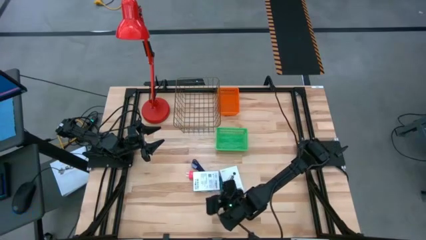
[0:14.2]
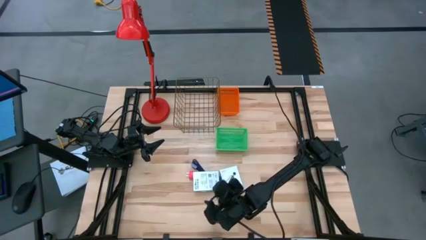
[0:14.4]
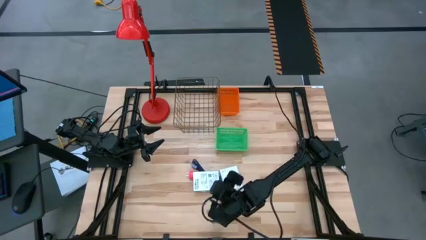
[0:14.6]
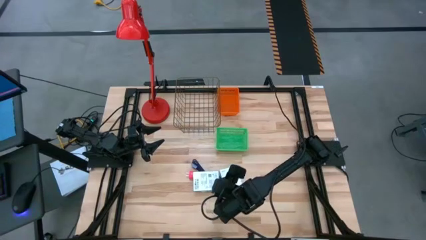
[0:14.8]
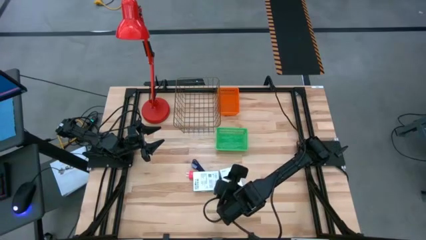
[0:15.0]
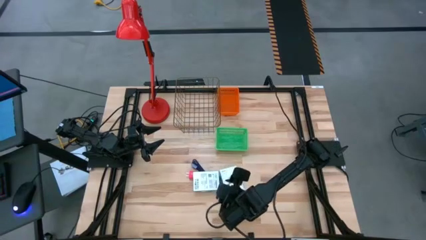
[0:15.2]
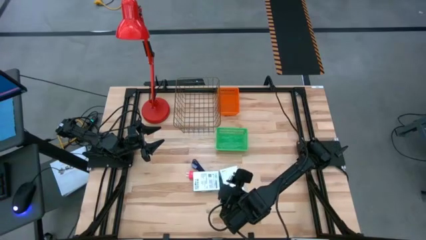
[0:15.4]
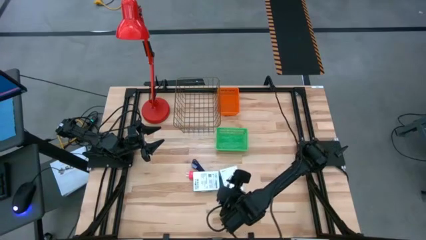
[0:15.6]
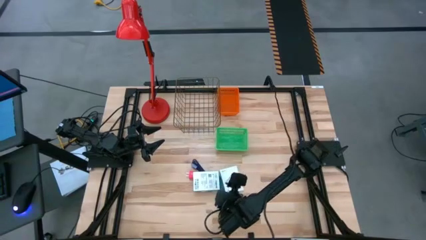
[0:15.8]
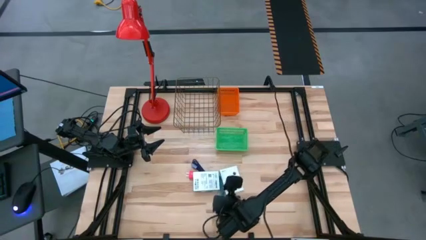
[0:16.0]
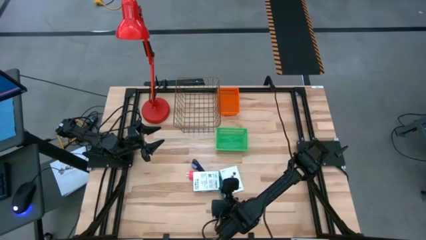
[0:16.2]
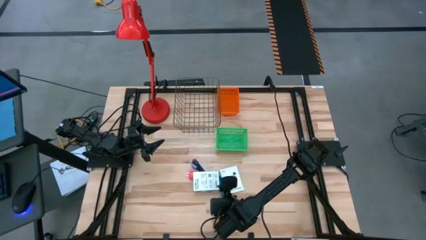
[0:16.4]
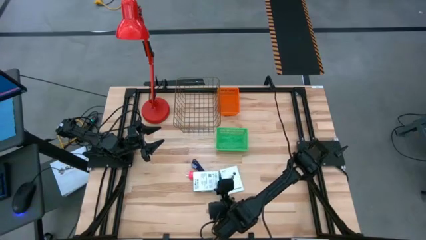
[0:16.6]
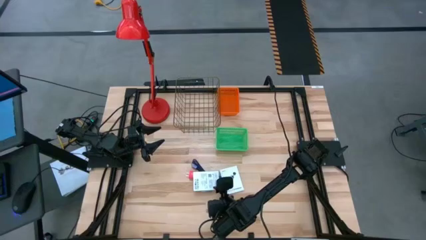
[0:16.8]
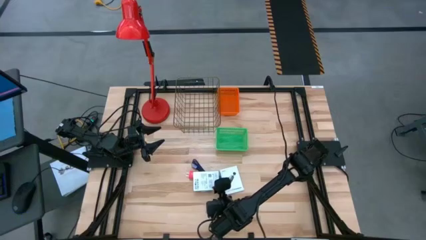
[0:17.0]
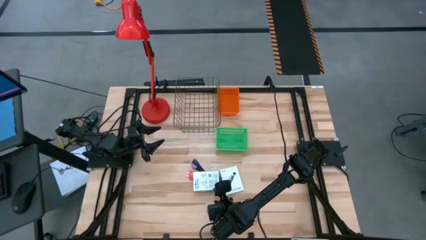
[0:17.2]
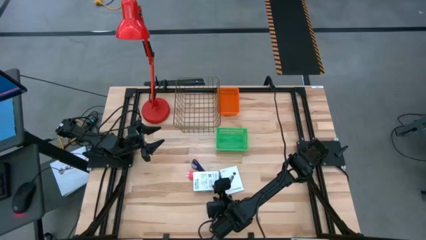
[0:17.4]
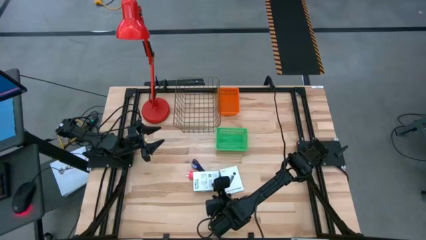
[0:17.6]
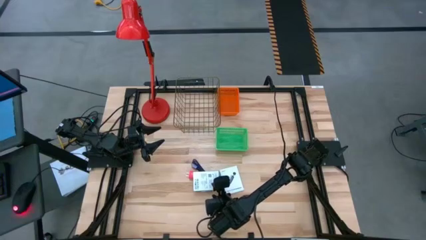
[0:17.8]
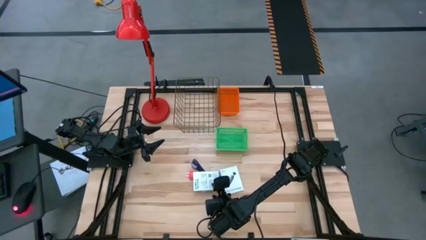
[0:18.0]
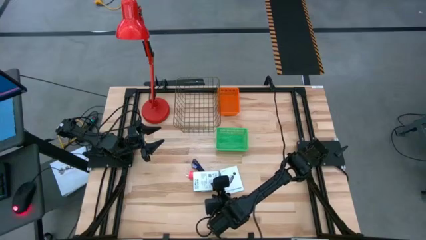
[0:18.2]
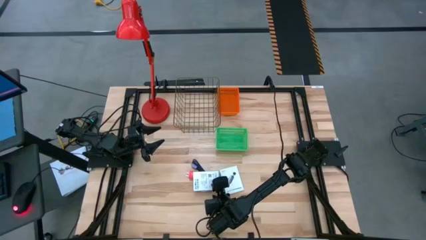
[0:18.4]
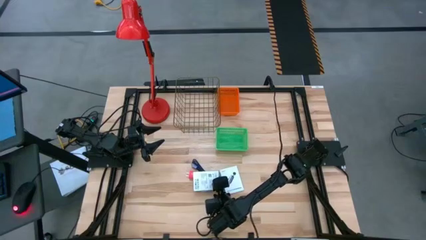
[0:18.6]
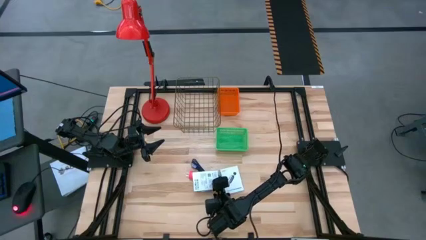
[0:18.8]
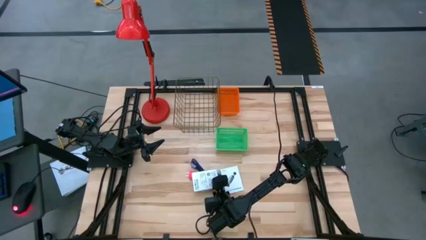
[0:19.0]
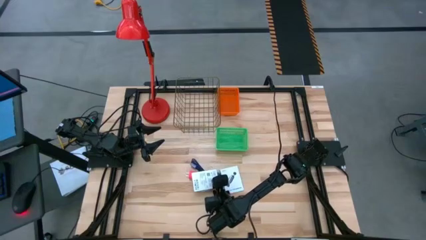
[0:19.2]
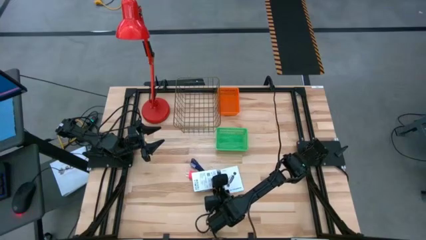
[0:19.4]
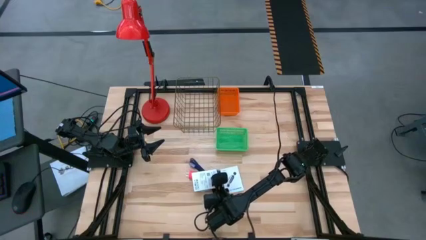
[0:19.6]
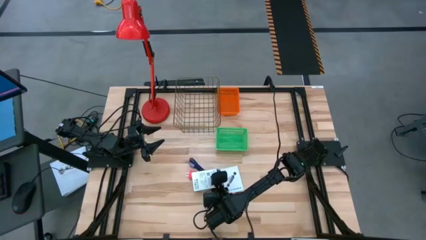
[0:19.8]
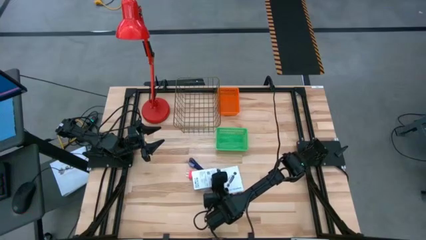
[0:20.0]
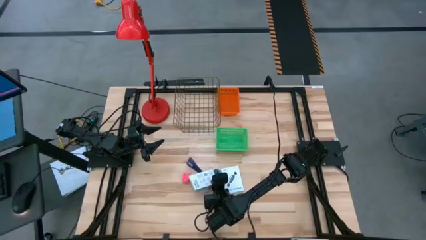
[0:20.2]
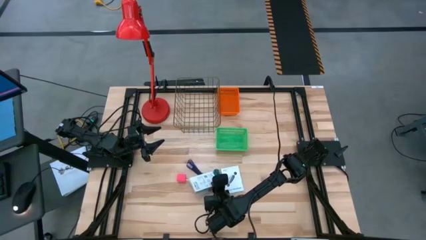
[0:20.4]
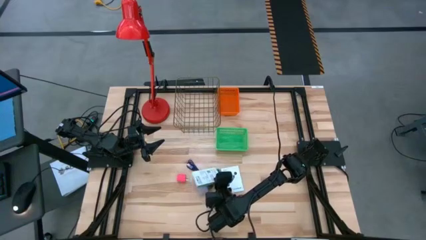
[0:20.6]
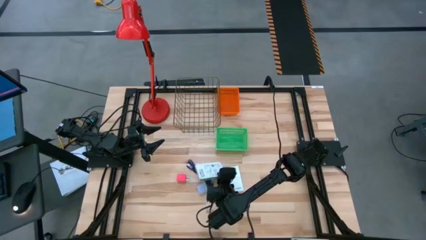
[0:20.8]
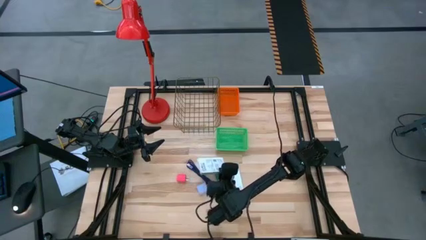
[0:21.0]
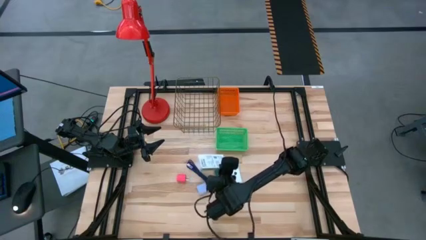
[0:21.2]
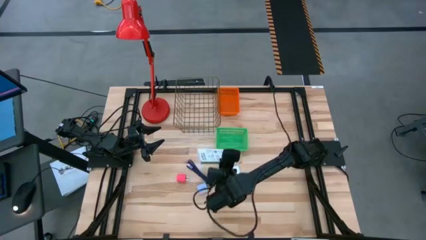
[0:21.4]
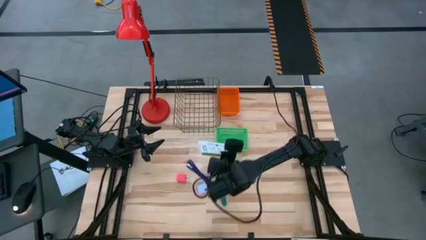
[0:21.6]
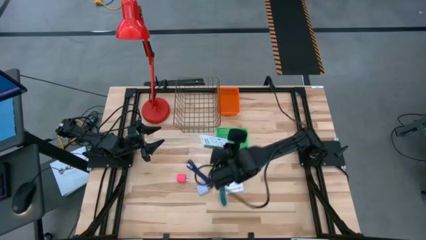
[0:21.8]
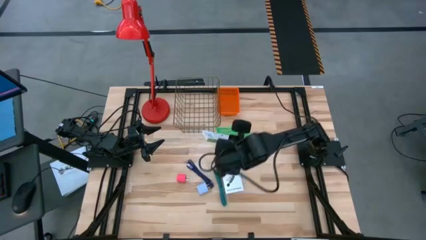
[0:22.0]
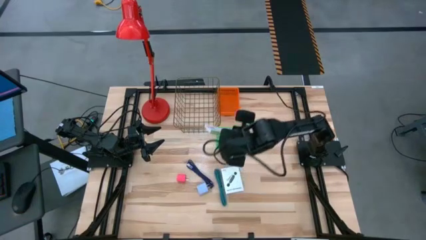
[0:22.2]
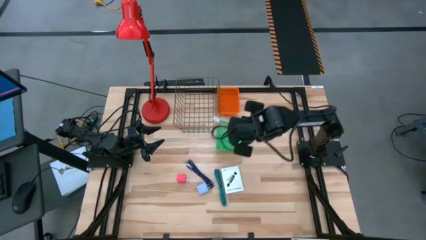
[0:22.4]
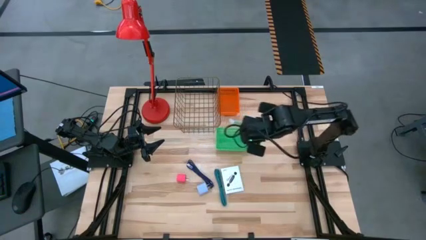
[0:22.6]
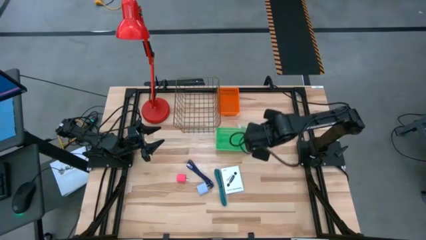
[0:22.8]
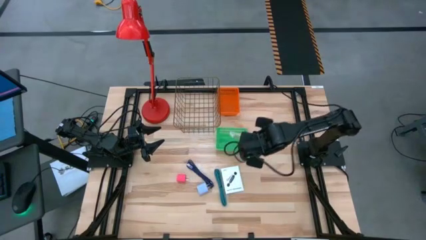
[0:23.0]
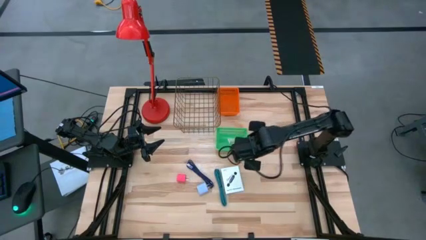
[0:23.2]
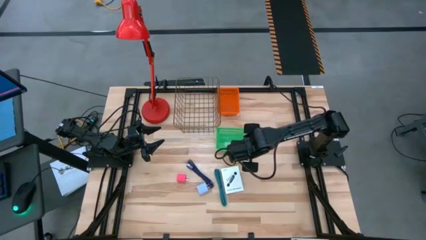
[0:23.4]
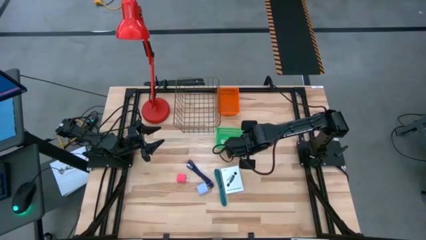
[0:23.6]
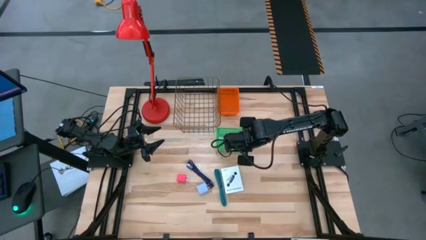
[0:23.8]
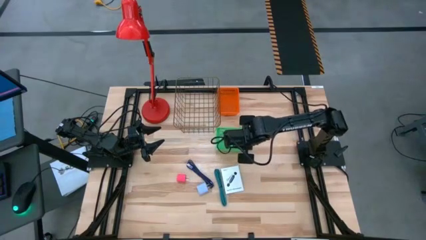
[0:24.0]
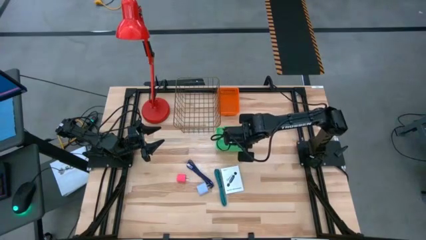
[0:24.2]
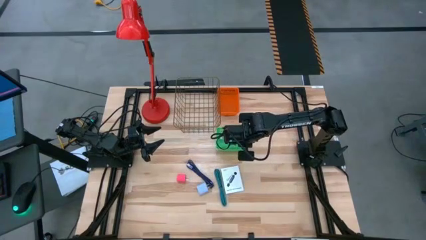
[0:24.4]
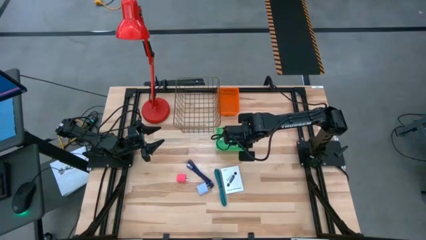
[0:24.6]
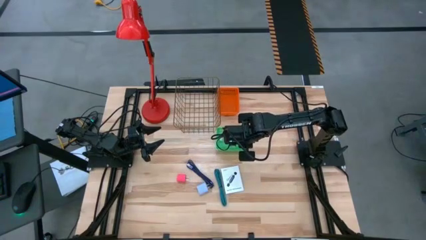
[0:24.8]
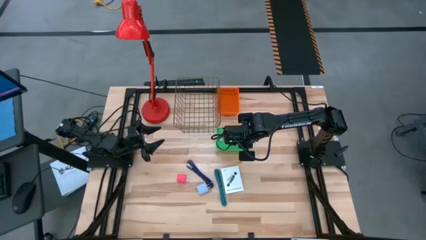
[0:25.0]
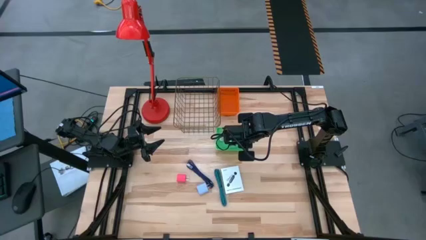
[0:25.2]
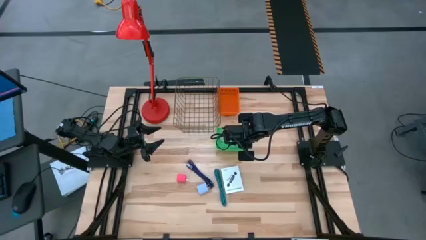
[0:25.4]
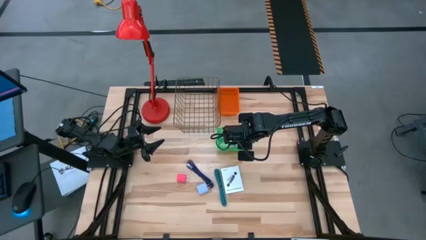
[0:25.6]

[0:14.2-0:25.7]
Task: Pick and place items into bin
Put the left card reader box into the green bin

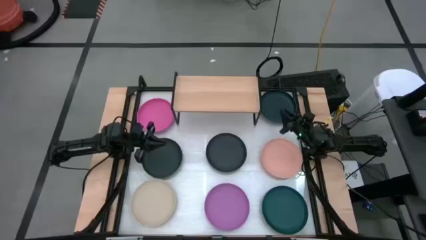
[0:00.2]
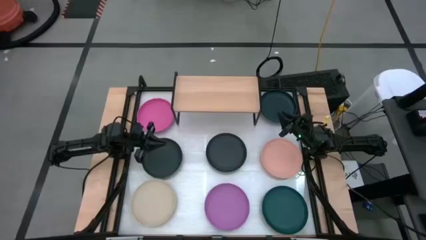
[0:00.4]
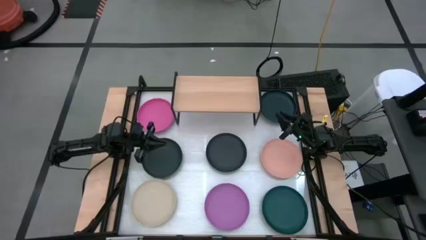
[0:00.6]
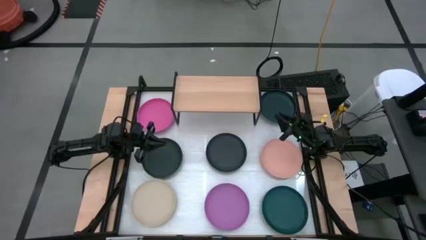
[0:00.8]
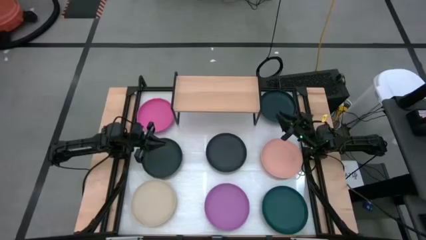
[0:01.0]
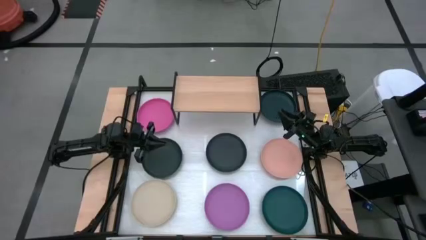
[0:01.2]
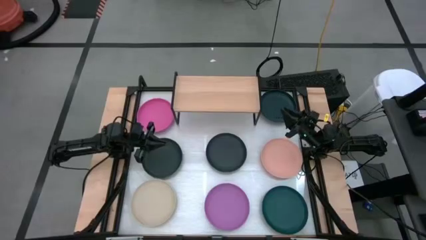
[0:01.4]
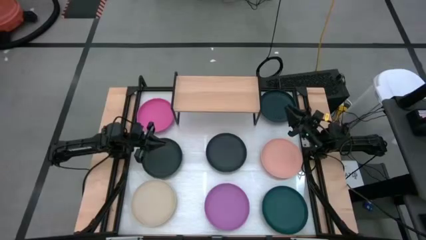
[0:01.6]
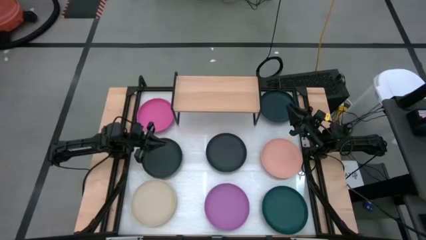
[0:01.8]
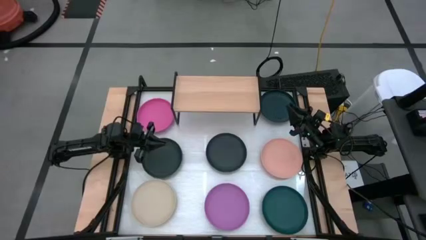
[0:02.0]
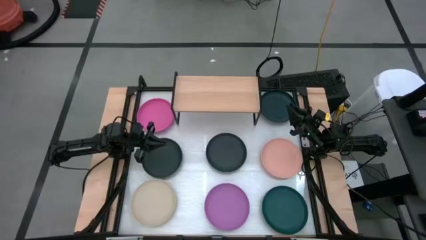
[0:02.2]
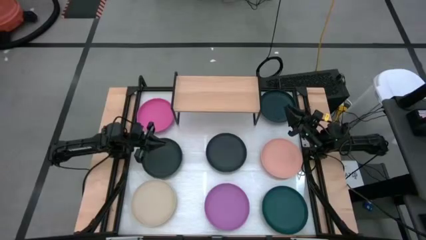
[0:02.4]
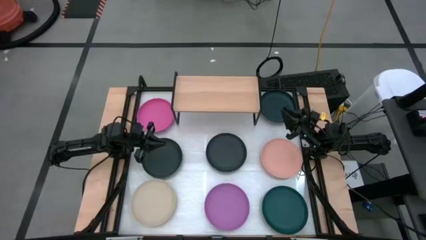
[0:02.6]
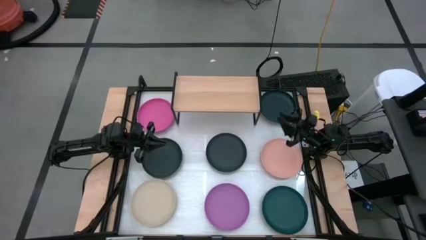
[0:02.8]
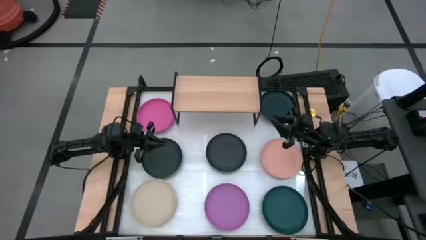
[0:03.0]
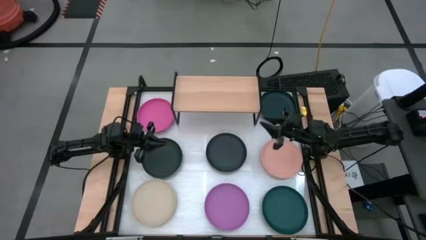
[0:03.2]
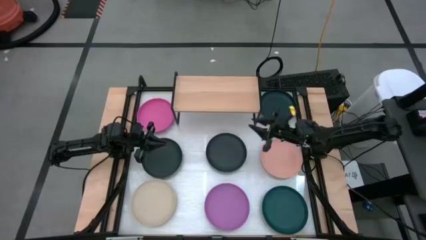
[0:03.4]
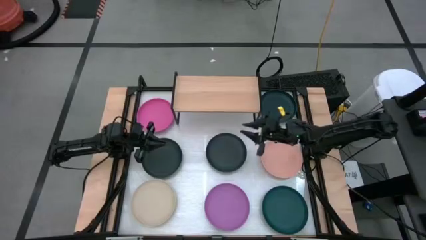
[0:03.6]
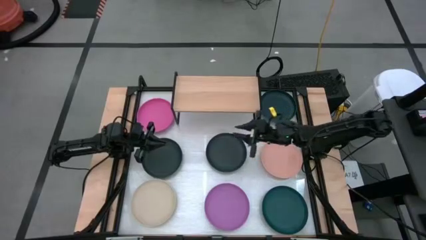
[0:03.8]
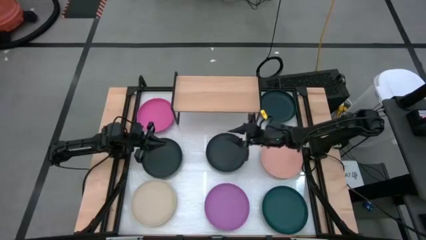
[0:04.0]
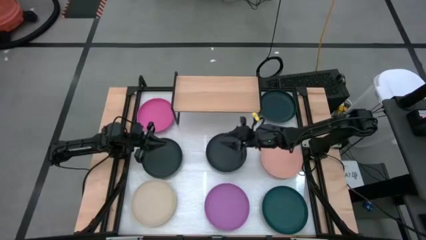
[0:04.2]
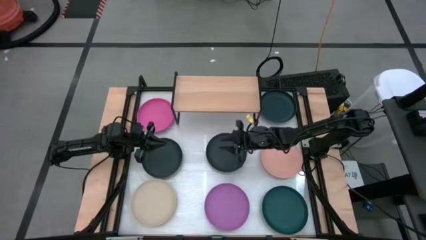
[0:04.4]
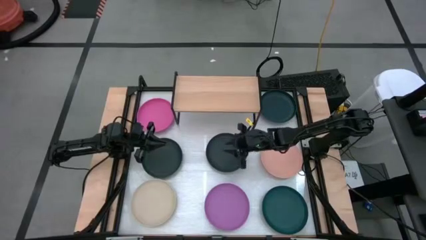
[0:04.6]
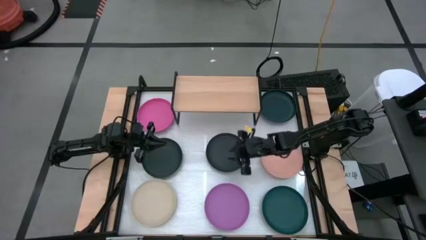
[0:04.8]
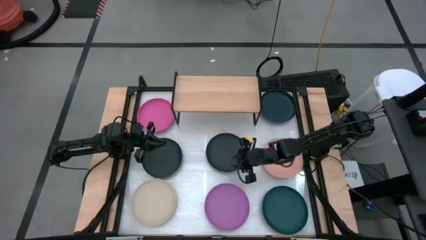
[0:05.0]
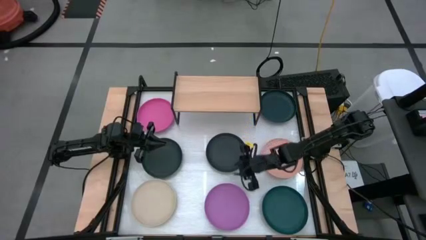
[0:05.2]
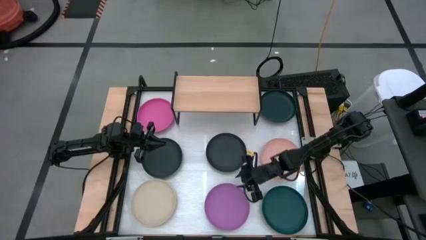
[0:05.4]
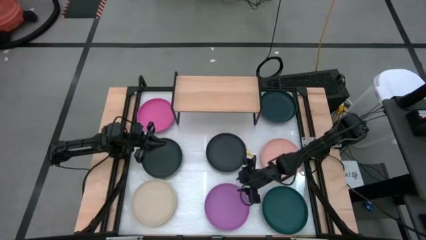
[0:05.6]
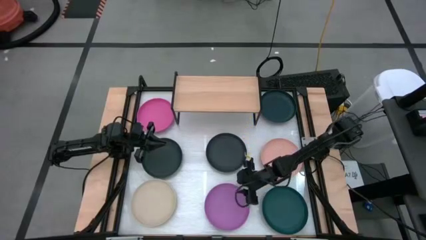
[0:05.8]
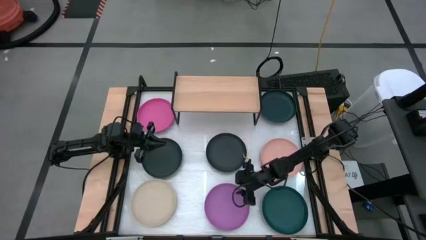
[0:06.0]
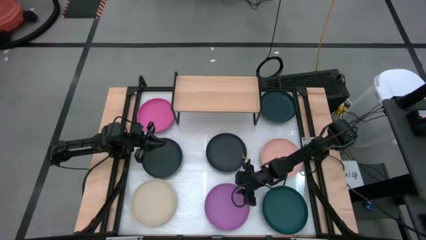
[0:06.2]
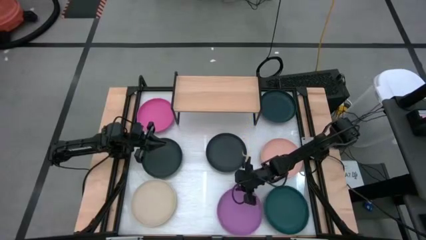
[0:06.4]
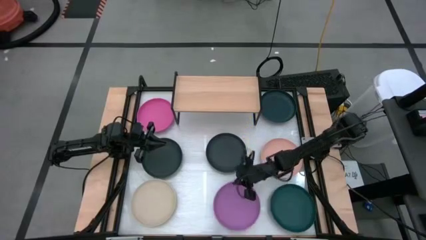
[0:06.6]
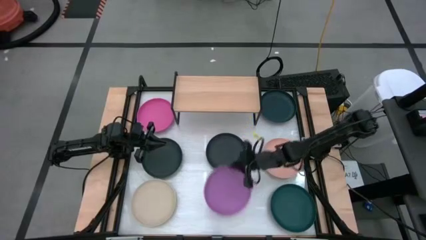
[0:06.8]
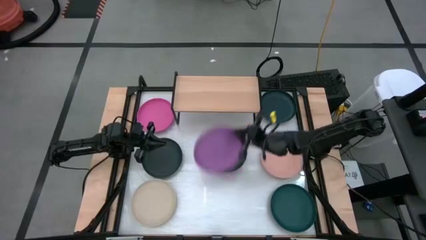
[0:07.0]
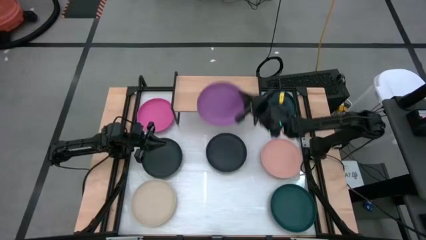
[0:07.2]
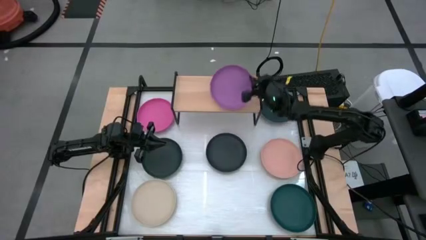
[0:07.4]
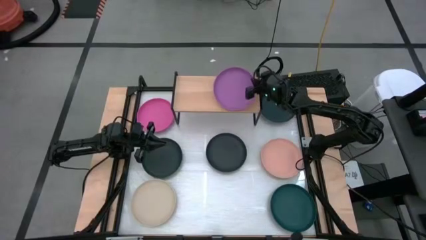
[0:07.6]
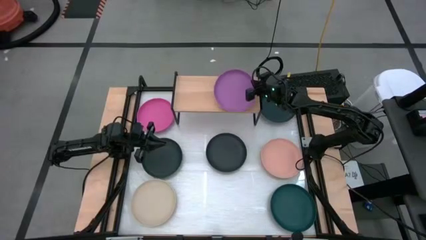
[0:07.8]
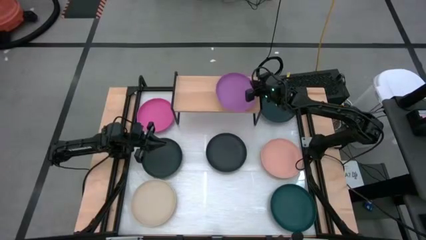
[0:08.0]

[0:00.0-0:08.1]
Task: Place and stack plates onto a shelf
Put the purple plate on the shelf
